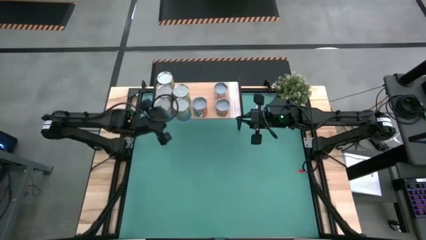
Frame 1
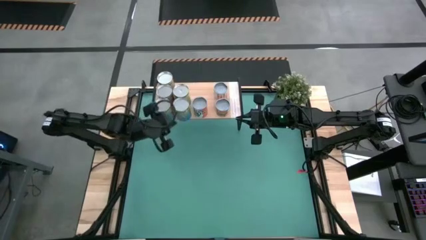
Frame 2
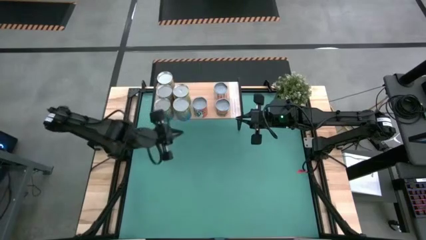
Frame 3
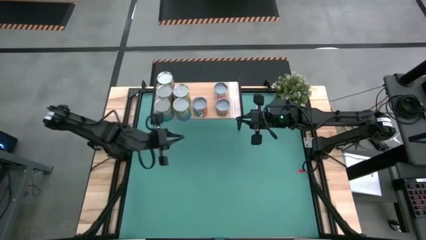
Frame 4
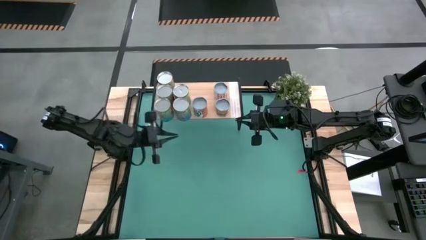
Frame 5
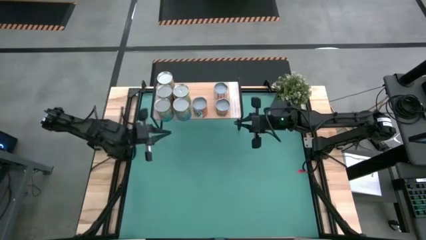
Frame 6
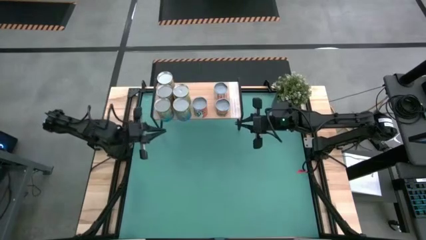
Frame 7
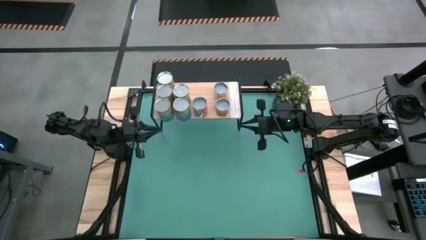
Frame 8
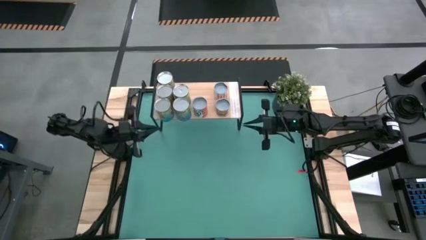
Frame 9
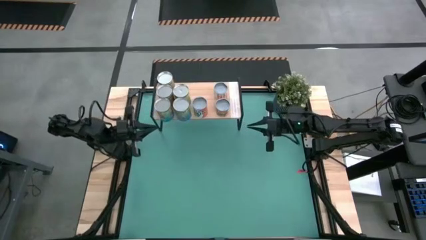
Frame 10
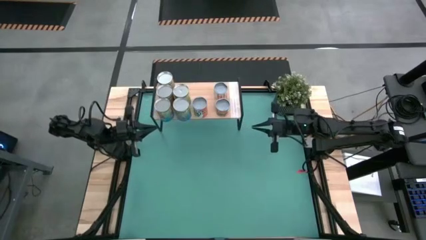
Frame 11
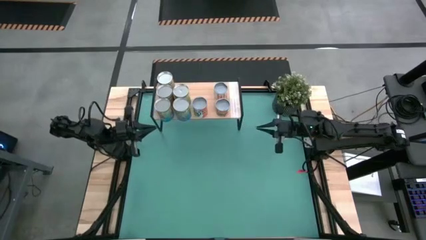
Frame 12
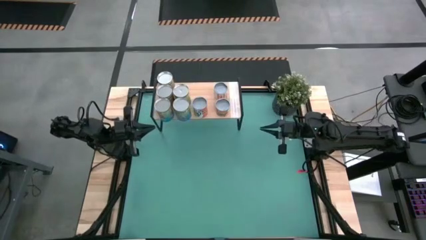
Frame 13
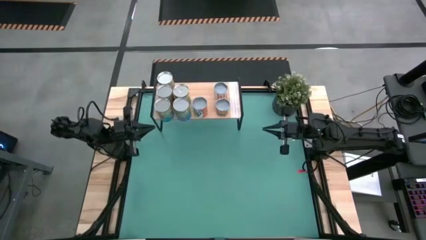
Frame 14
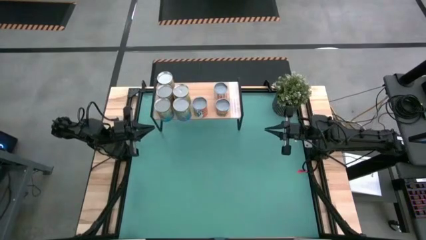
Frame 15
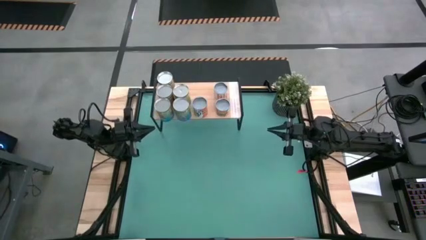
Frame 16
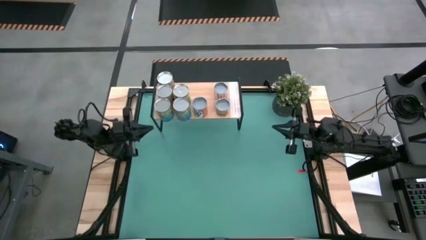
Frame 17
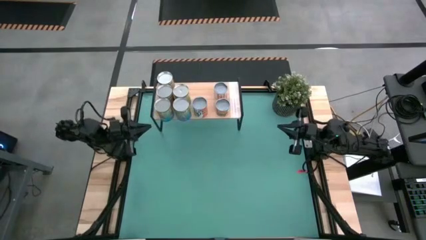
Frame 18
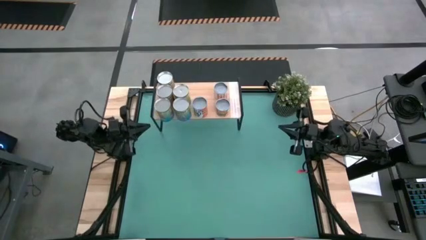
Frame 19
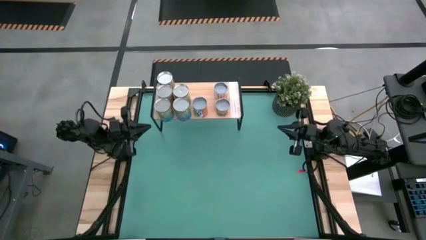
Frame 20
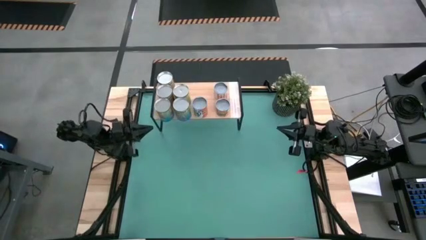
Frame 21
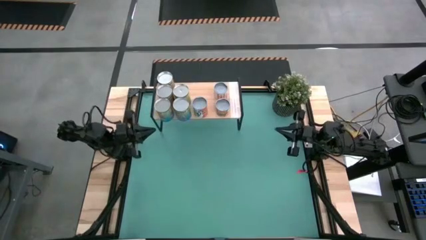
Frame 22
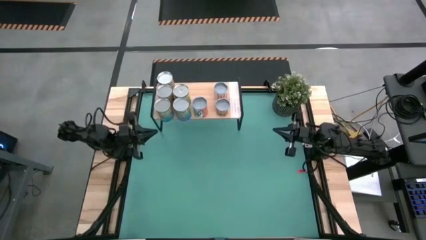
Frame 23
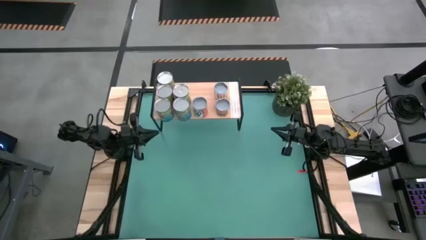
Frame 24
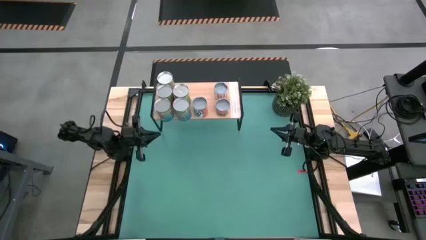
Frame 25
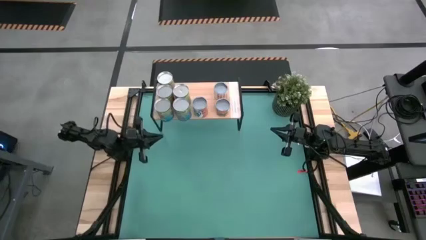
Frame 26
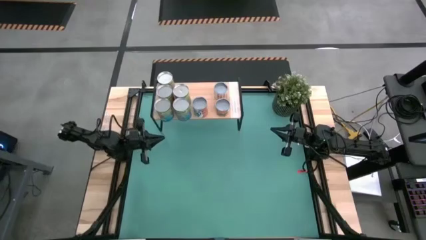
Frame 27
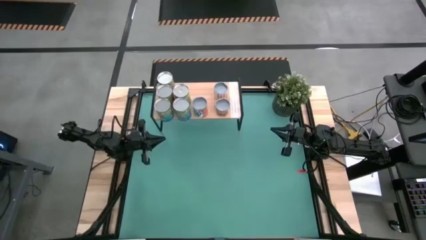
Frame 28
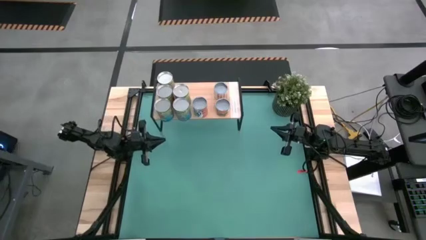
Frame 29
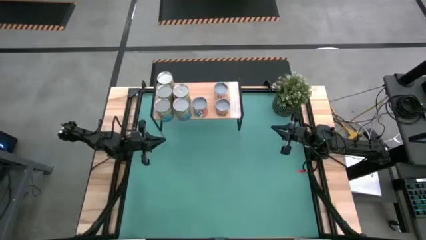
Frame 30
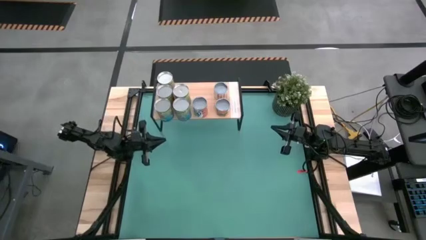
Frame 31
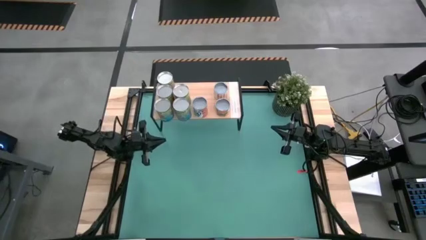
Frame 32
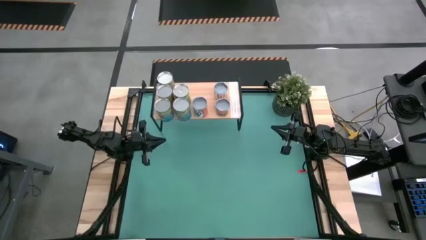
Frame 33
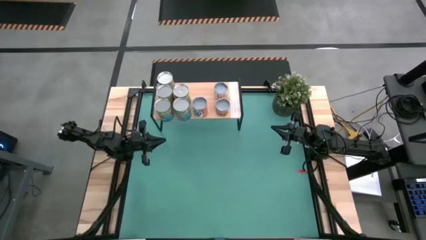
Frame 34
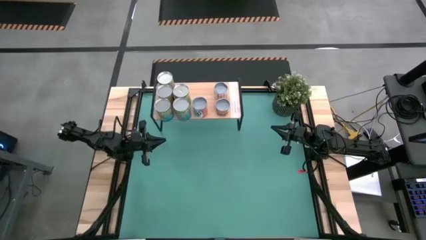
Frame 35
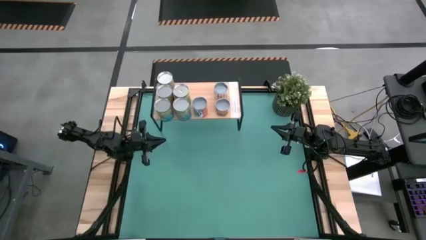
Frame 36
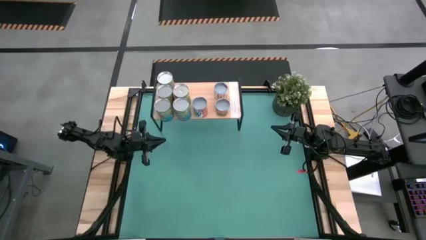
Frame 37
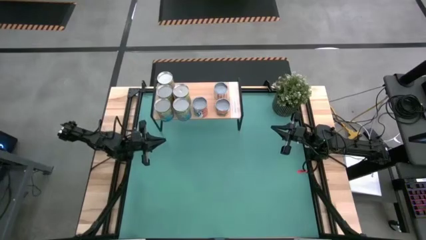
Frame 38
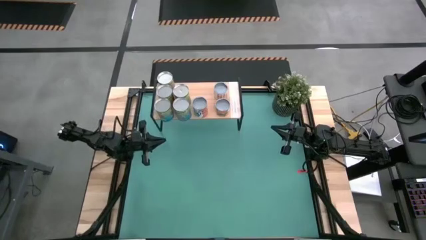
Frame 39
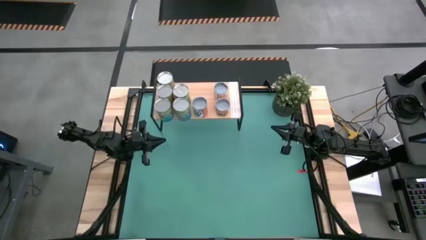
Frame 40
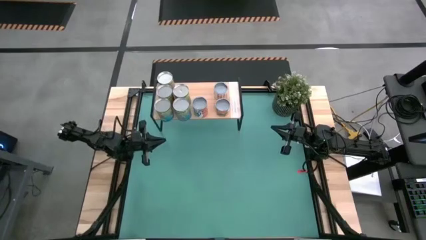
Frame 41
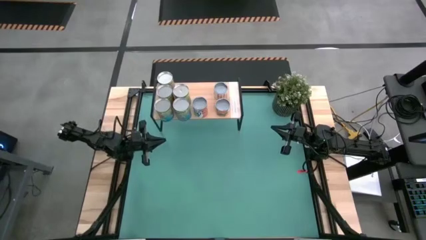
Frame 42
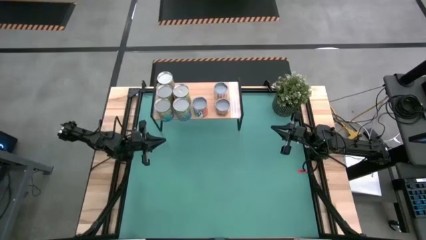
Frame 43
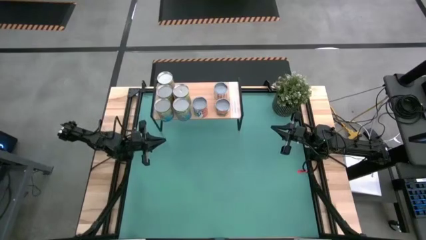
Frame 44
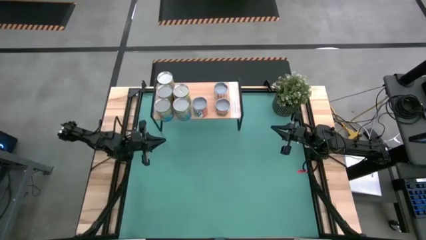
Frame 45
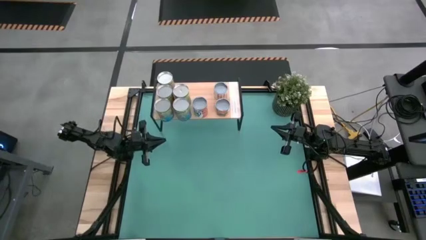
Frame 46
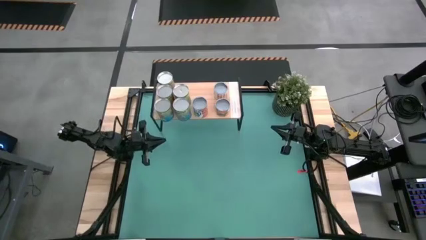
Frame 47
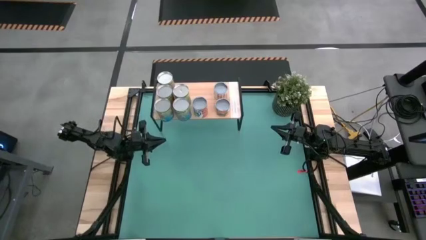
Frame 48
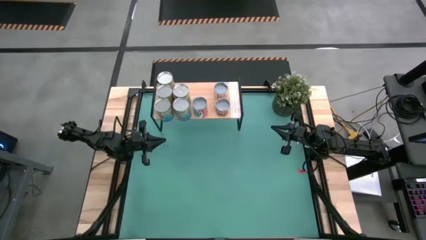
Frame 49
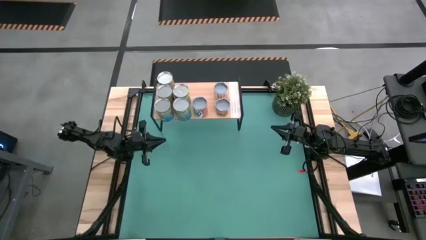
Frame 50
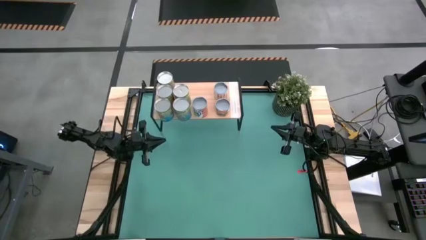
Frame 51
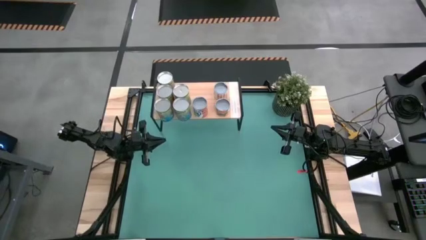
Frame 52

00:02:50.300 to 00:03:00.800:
Task: Pick and place cans onto a shelf
Return to Home Position

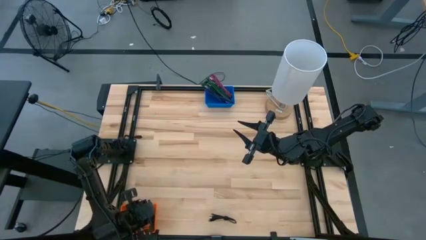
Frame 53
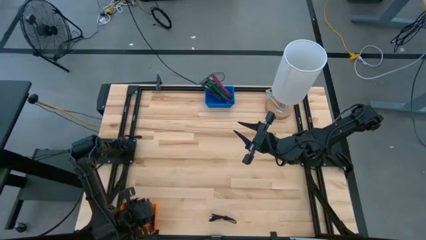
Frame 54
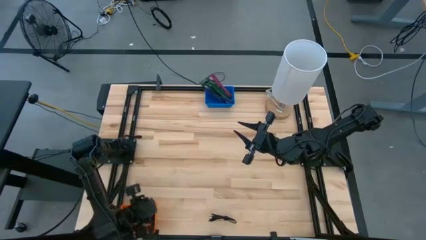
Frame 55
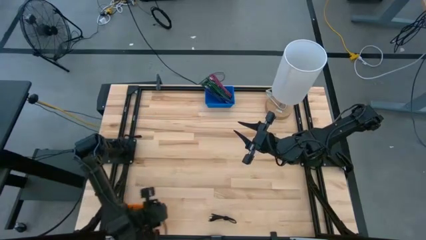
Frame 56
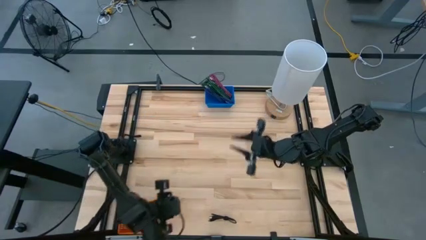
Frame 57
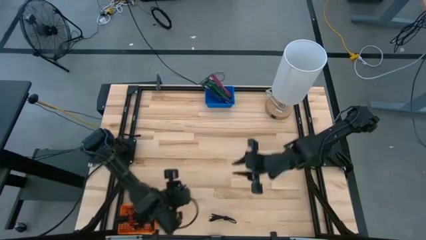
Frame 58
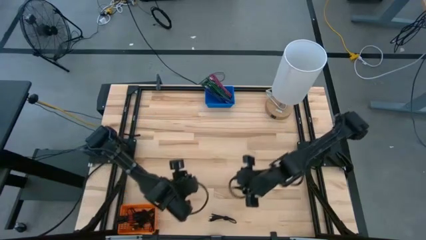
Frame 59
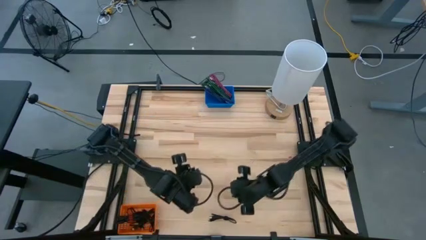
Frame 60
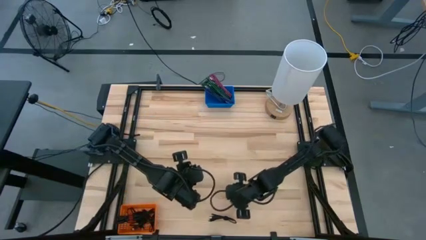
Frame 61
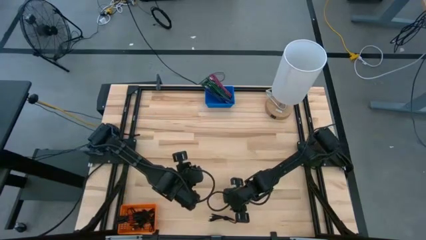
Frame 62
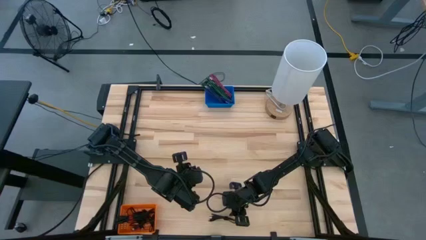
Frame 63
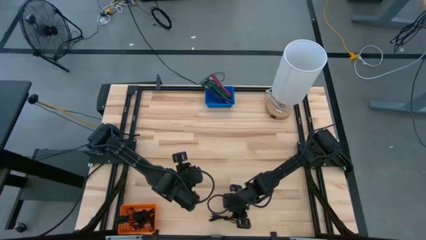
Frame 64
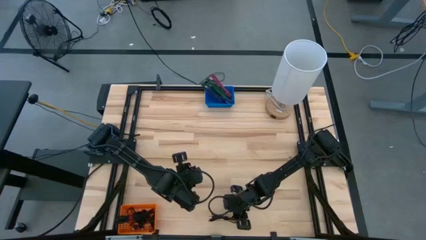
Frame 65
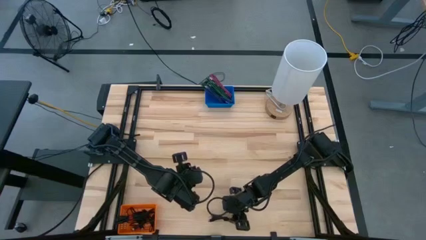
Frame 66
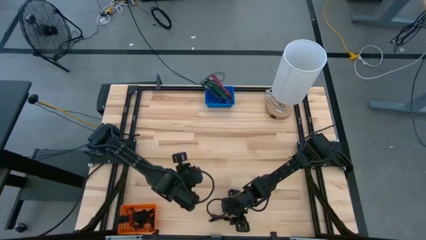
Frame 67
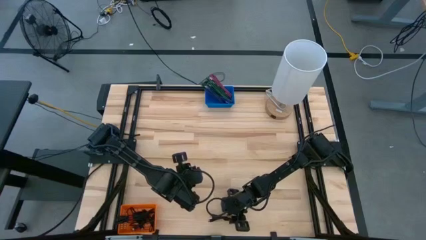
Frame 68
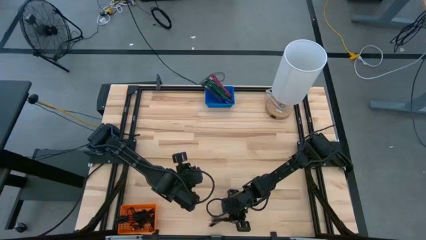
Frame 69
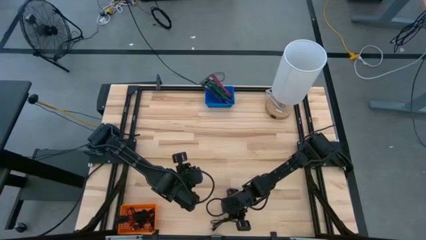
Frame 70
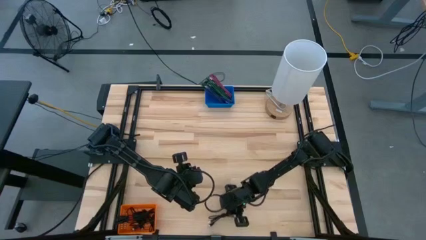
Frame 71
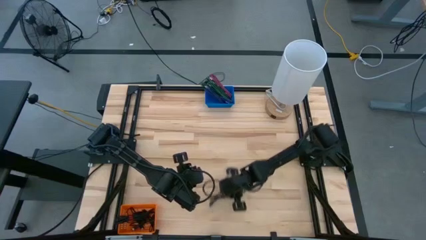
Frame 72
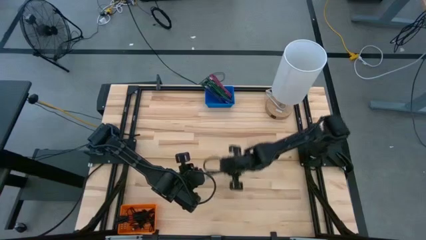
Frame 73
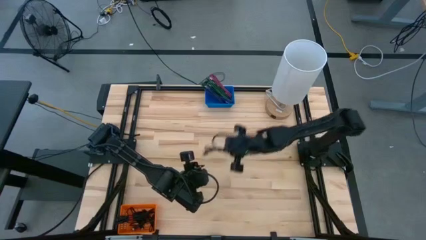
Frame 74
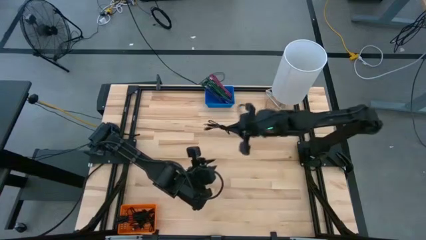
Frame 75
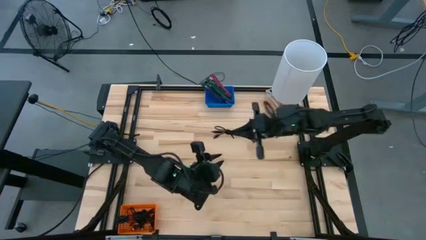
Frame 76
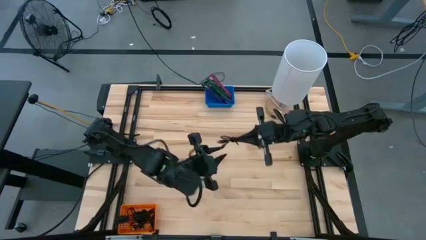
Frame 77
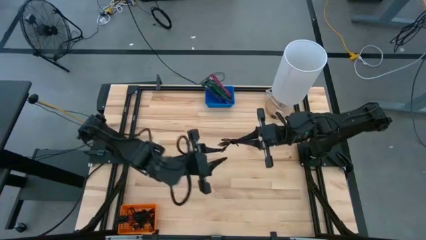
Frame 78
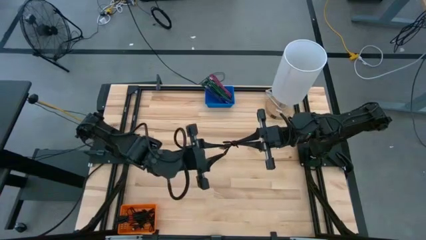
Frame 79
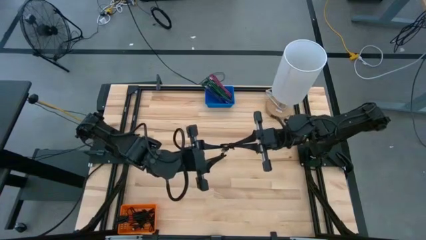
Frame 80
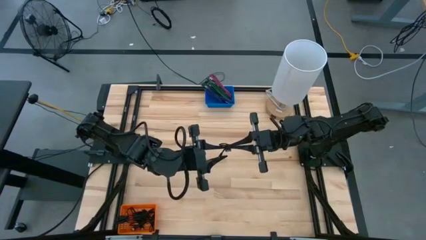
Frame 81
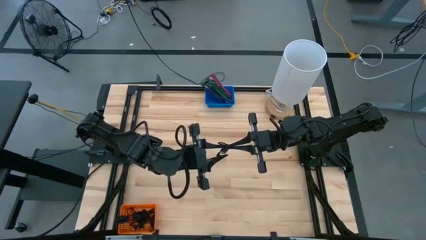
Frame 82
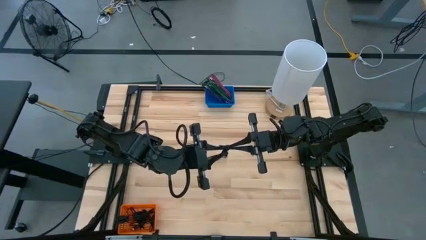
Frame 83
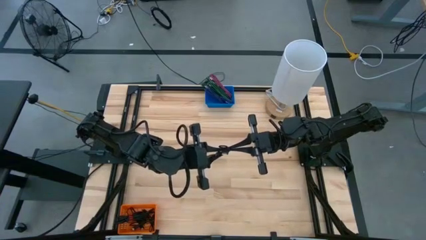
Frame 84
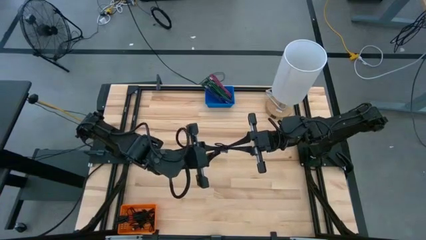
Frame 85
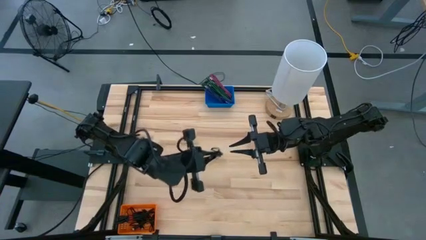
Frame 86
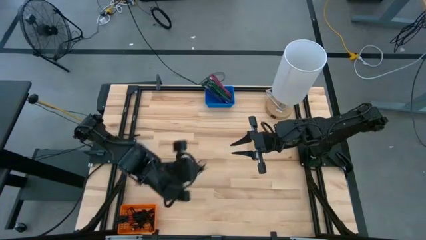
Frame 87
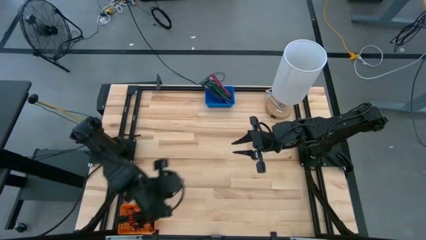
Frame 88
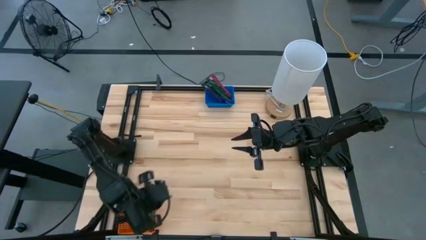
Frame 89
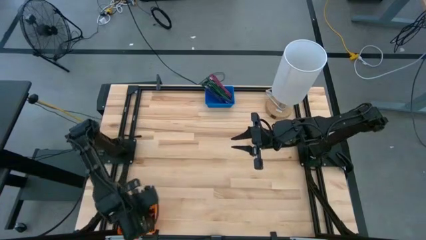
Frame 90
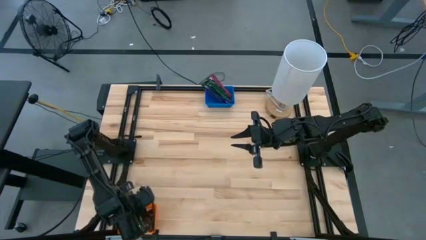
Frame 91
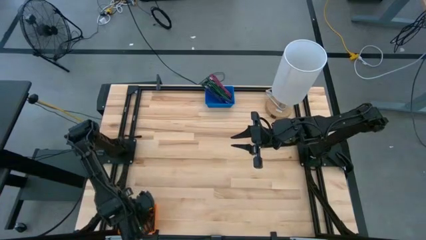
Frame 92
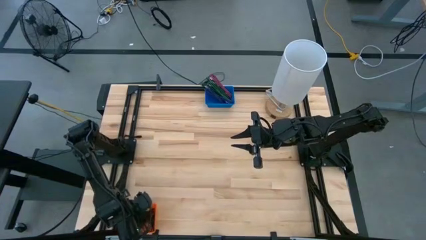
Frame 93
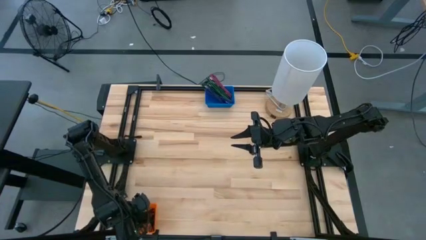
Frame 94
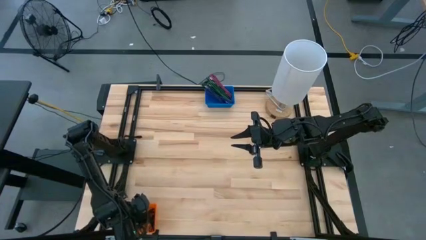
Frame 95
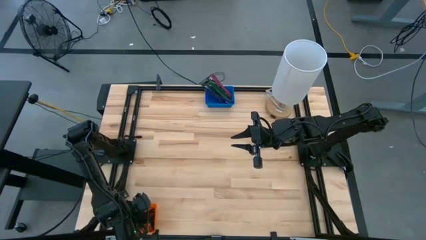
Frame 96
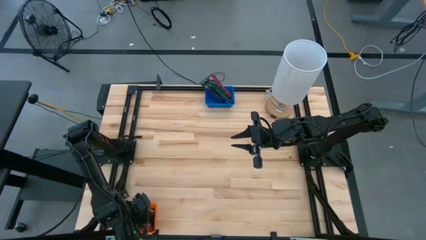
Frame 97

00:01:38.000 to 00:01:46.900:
Task: Pick & Place USB Port
Put the black charger cable into the orange basket
